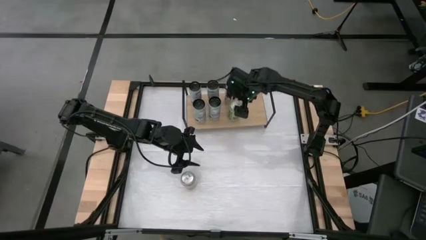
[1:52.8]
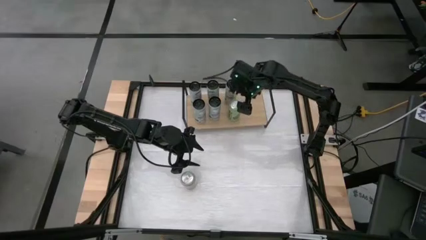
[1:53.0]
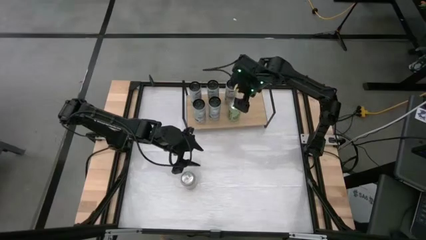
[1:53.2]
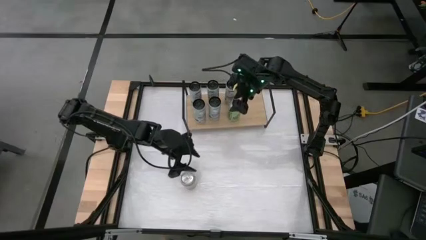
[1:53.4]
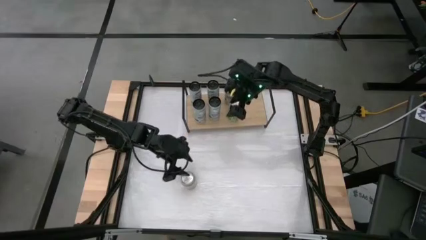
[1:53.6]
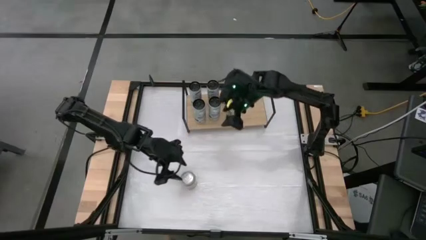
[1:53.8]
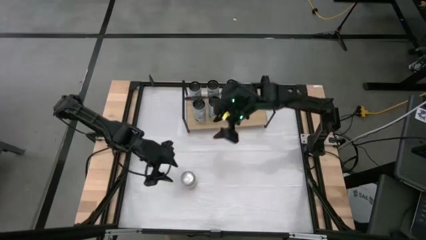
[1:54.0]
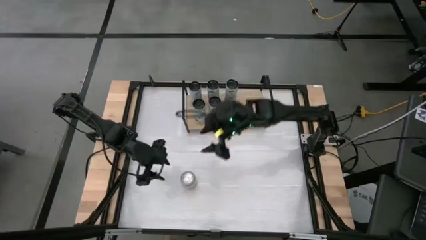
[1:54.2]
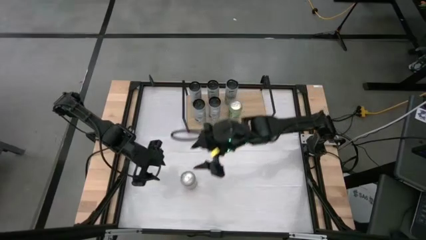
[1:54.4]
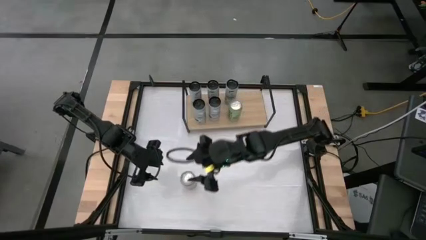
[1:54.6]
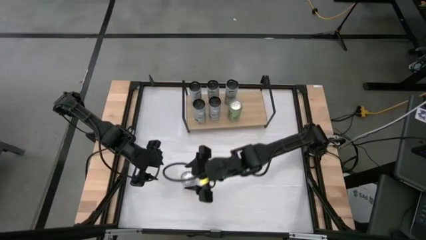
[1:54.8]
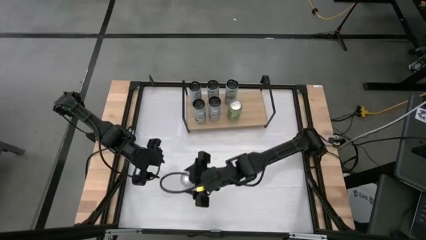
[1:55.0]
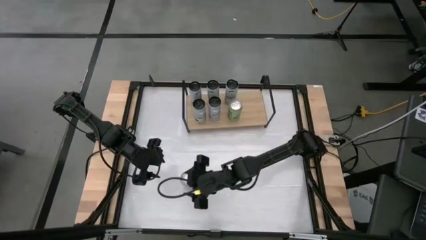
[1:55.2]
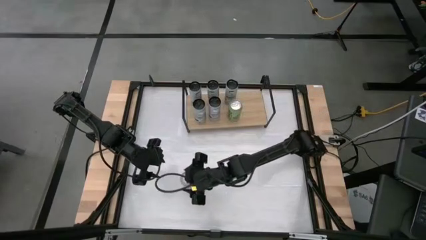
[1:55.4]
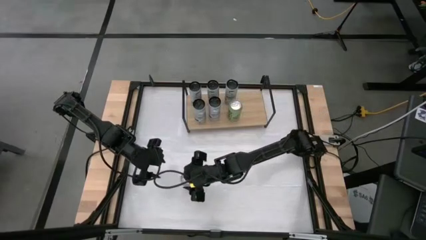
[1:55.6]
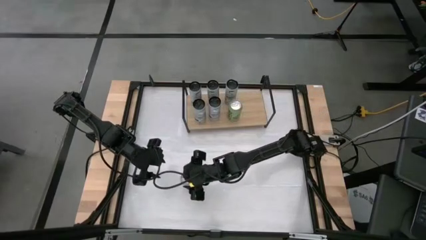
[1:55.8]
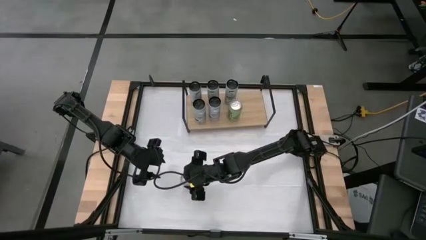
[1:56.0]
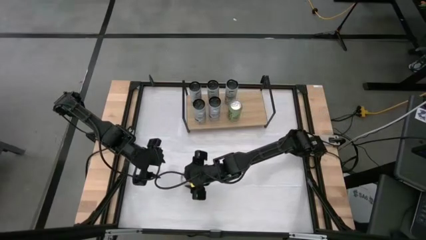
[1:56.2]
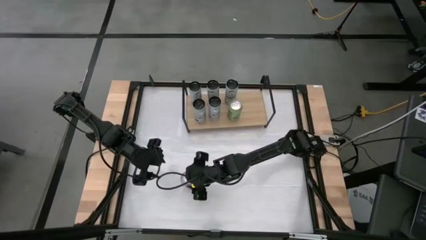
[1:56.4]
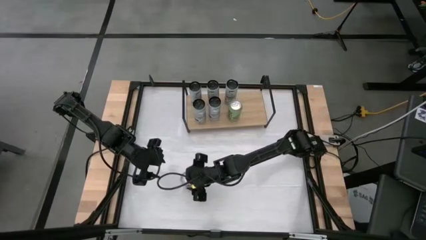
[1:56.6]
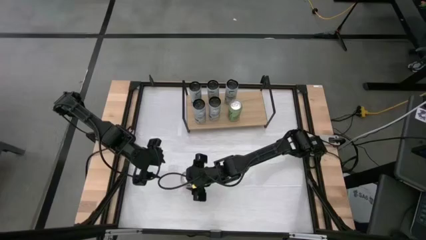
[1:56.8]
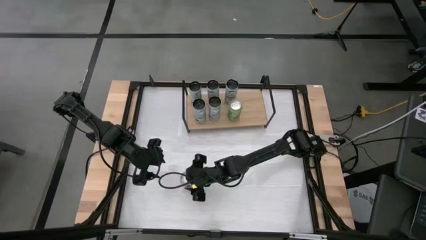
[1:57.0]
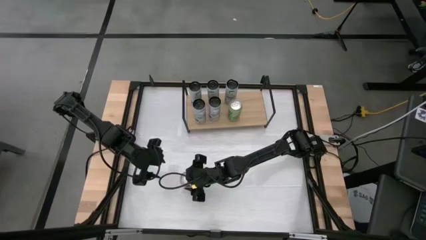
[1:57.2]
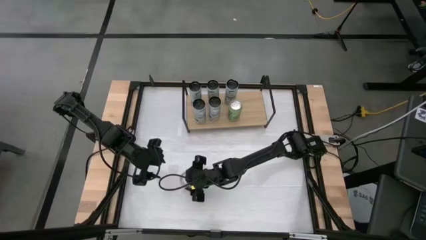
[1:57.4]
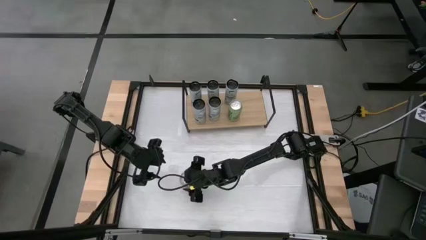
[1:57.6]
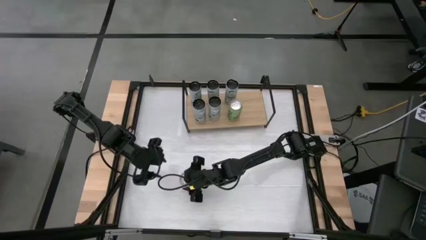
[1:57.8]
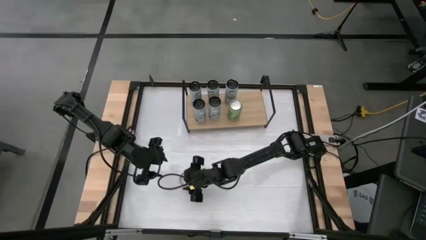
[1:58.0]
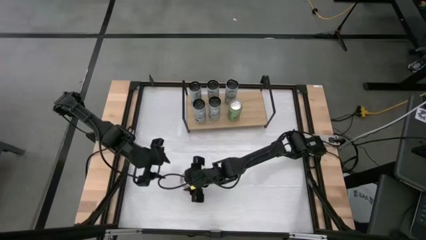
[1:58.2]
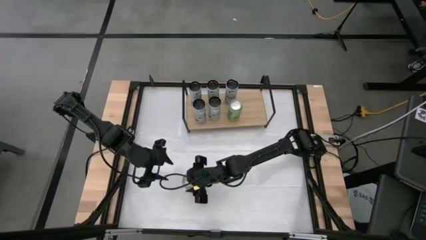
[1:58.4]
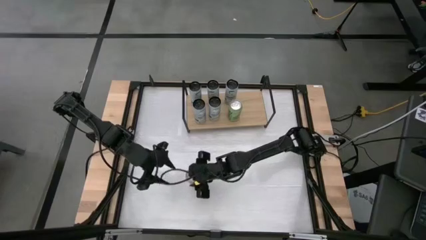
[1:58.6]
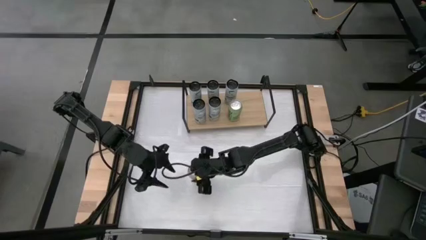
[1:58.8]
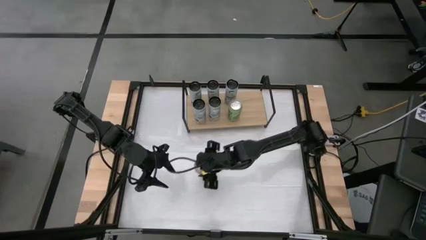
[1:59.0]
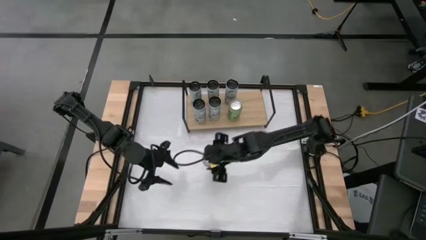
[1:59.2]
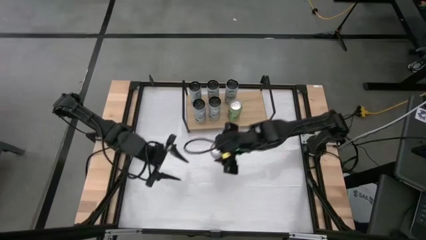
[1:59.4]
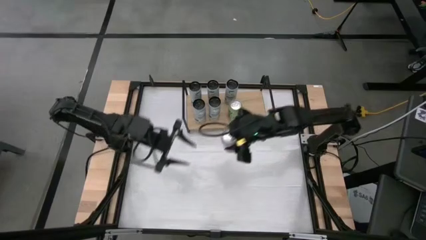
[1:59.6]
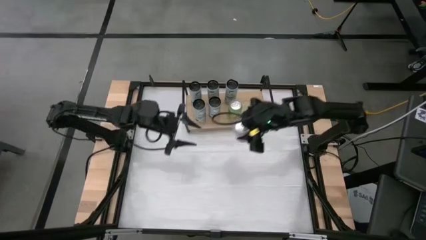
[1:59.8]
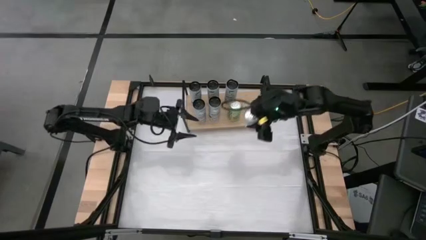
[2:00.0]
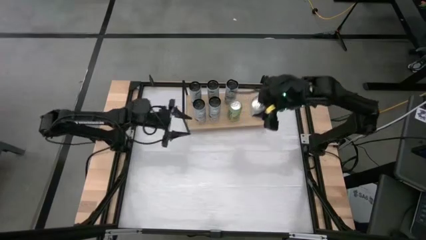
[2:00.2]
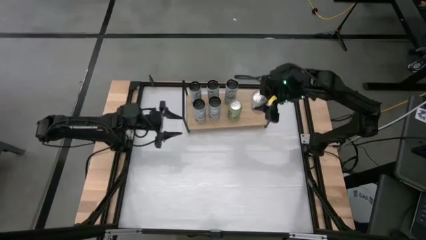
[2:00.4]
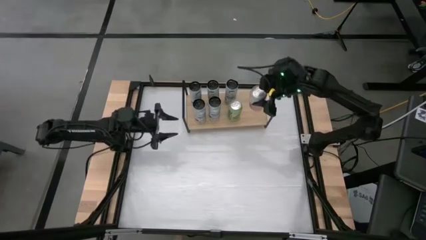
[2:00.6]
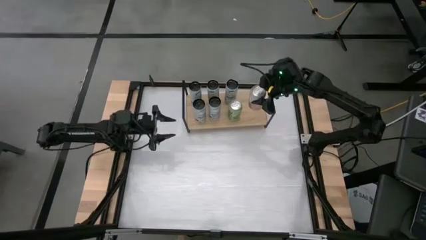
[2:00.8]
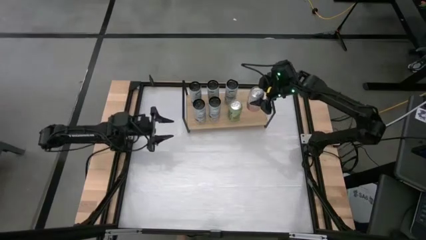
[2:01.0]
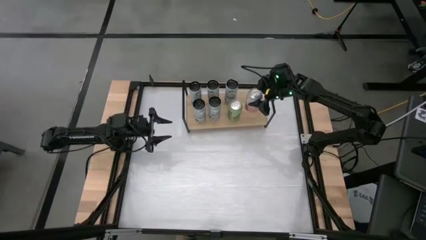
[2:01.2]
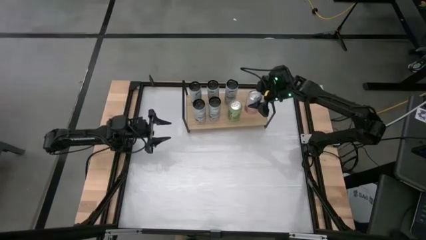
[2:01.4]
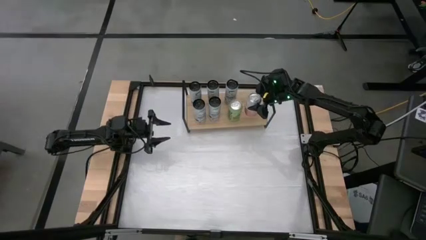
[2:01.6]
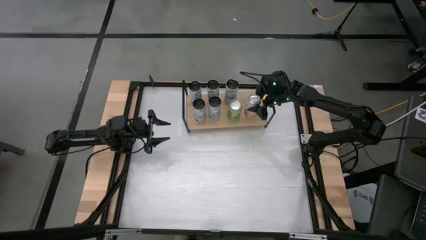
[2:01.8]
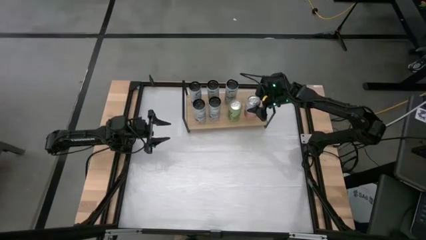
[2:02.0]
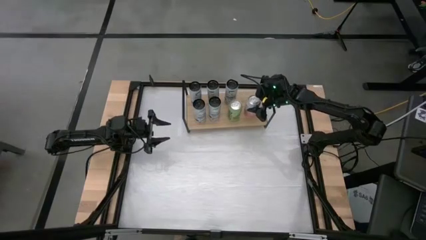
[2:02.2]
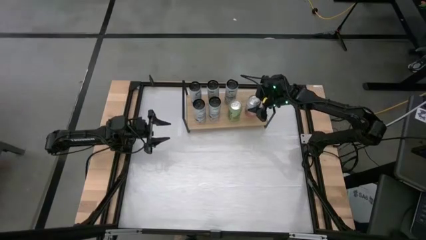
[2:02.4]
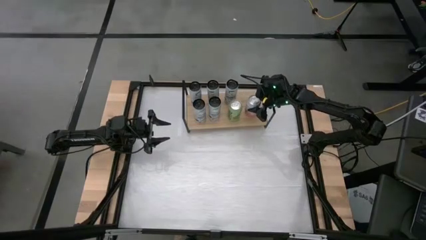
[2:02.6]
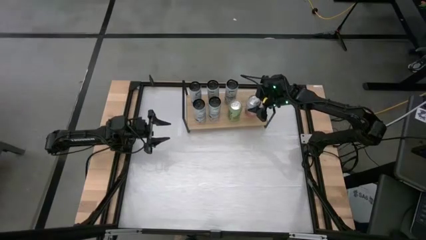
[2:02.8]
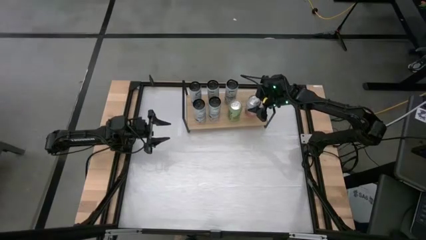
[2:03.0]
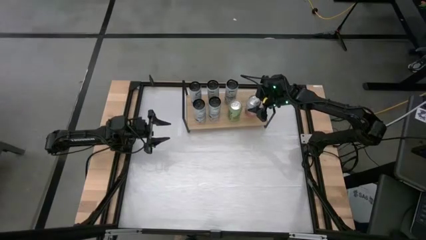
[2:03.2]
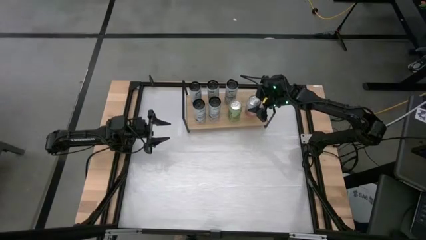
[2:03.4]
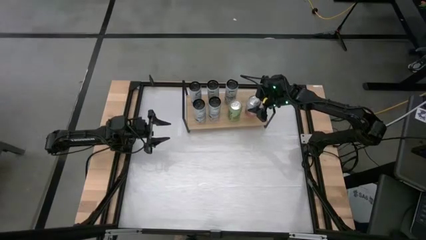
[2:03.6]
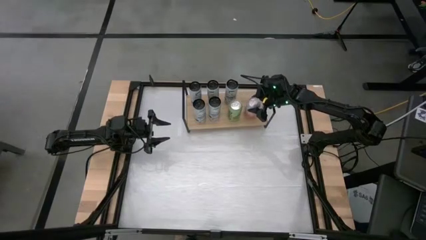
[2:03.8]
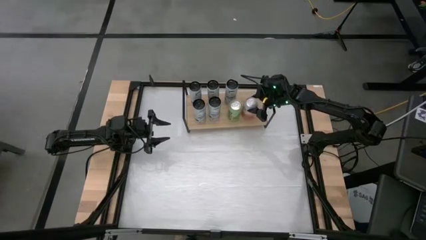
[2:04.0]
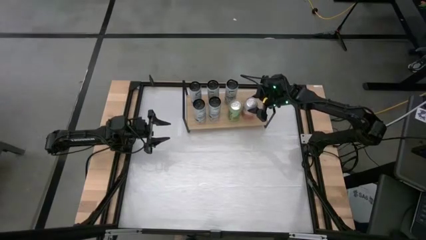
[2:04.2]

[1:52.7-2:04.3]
Task: Place canned beverage on shelf
Put the yellow-white soda can on the shelf

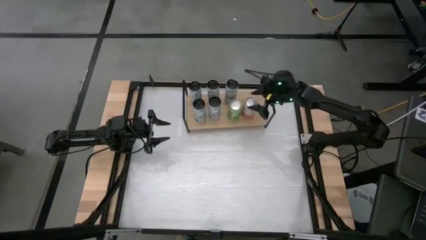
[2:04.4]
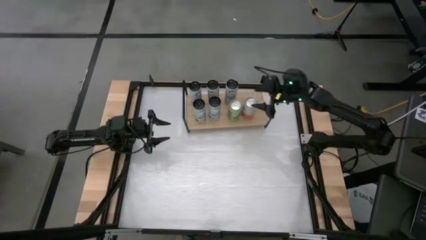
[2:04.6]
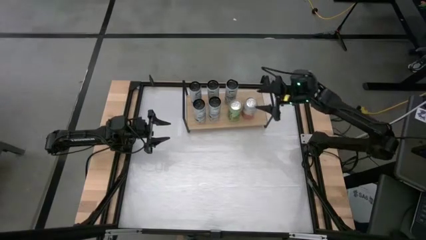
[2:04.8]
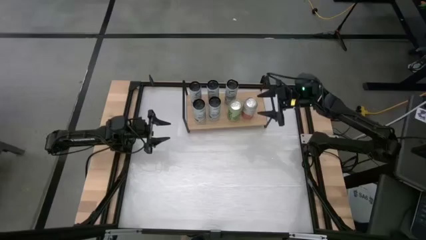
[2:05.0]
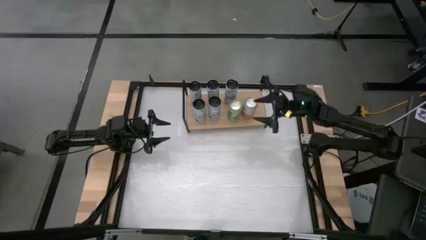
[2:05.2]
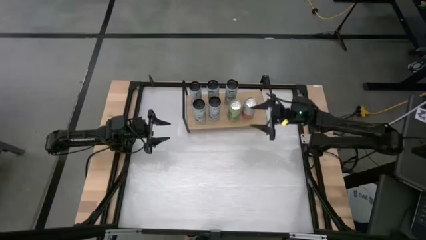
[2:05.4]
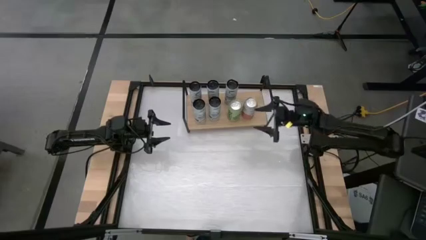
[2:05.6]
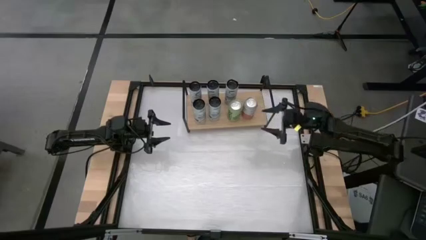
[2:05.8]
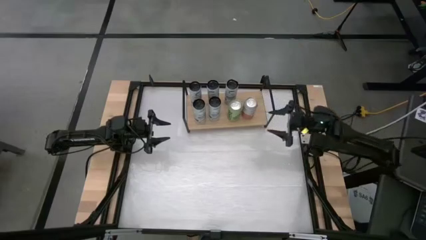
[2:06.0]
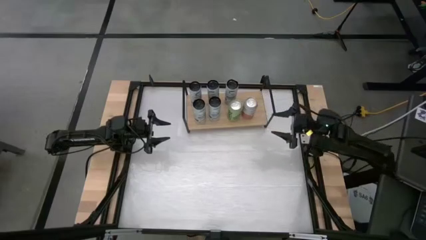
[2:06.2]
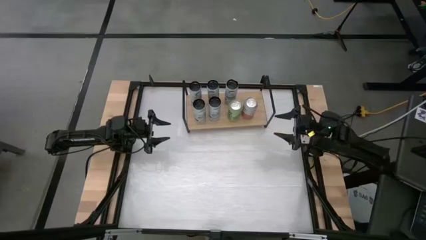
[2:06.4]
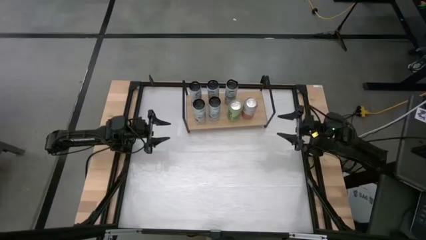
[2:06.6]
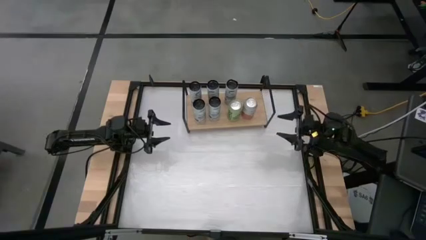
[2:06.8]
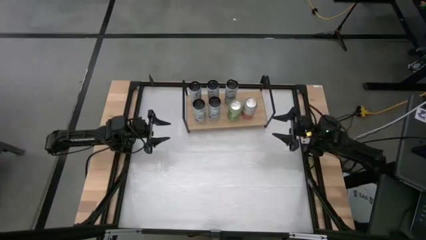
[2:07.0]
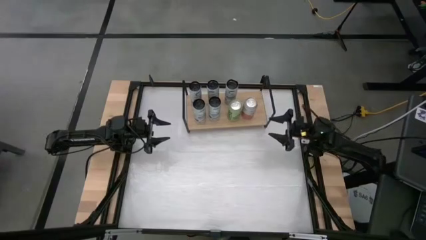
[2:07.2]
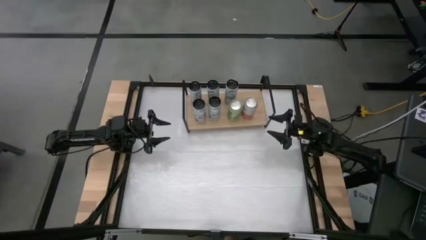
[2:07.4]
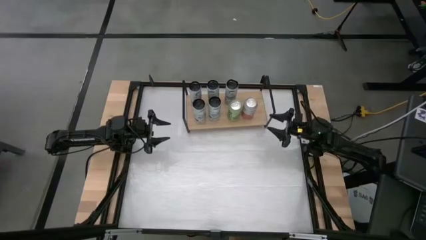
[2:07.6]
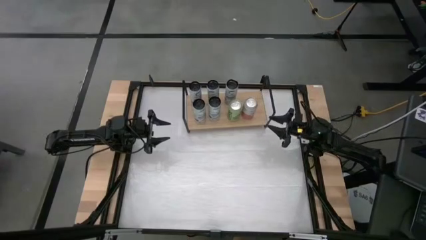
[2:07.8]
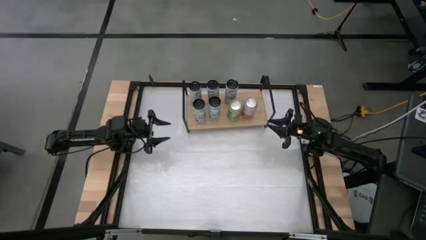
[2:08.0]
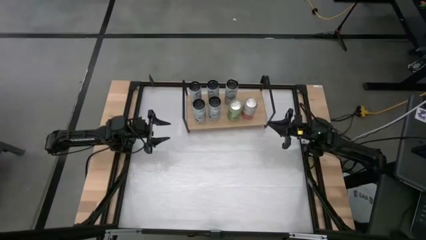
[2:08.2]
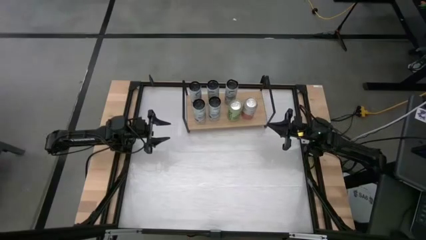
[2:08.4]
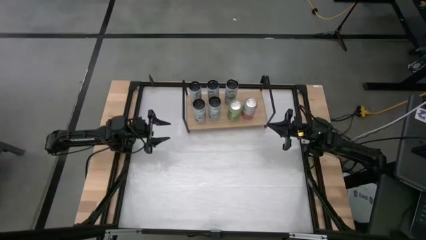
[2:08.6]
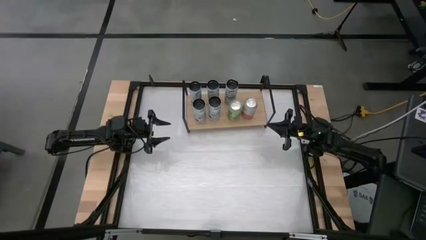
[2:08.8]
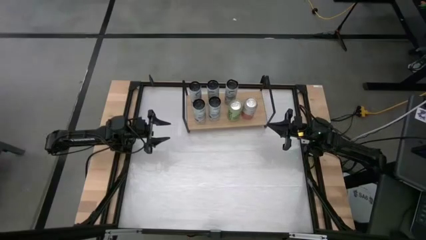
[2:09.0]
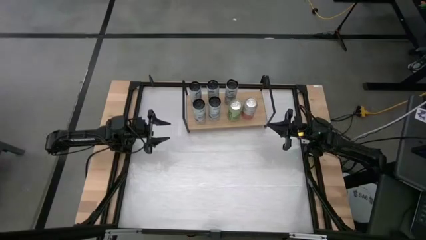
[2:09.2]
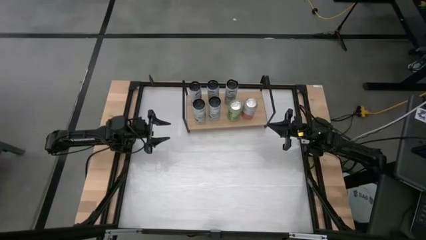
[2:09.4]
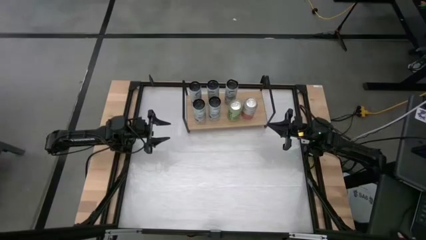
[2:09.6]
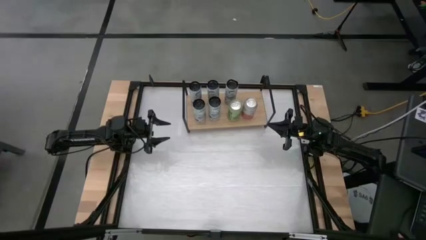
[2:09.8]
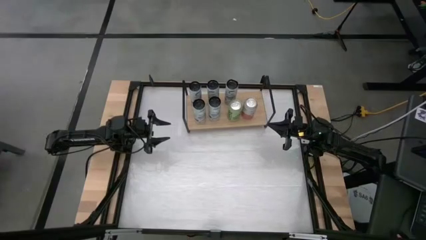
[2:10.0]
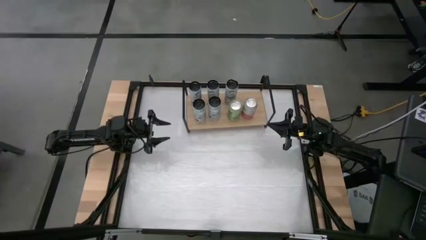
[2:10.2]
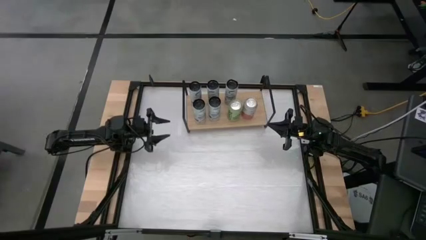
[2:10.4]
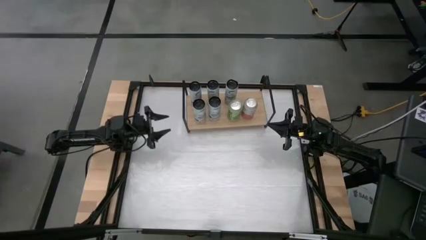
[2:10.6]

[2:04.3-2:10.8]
Return to Home Position
